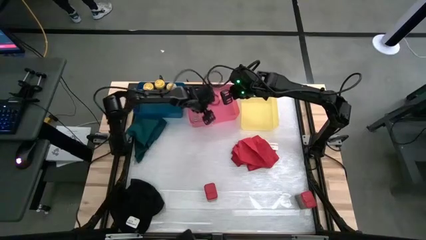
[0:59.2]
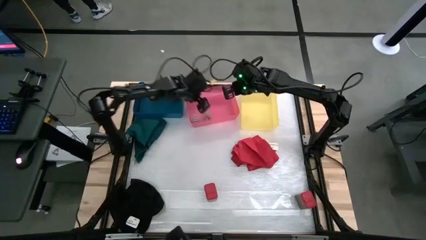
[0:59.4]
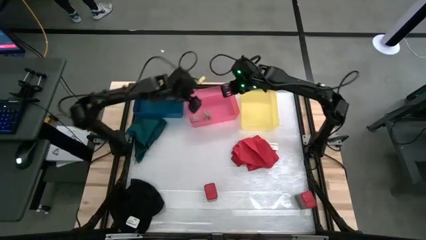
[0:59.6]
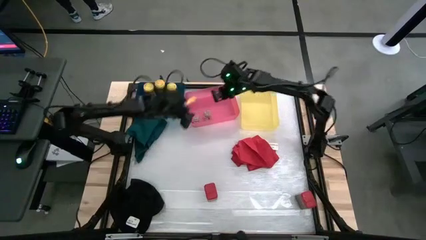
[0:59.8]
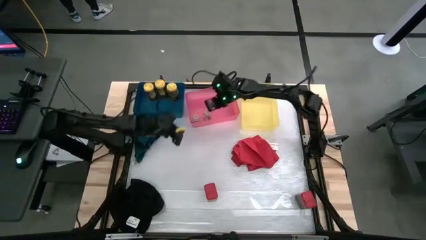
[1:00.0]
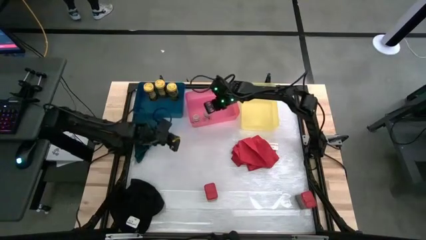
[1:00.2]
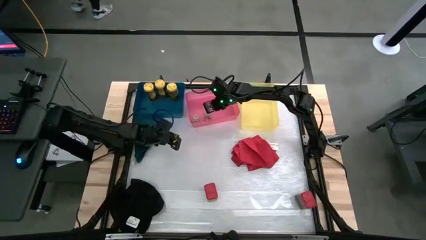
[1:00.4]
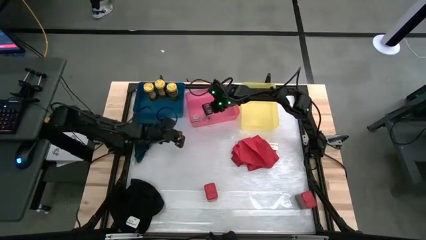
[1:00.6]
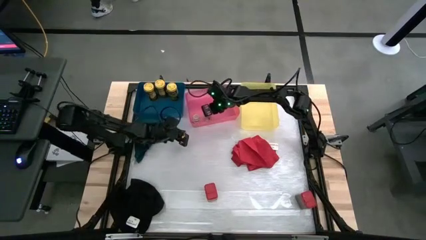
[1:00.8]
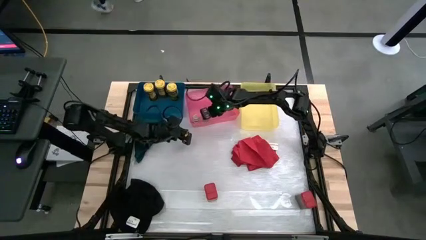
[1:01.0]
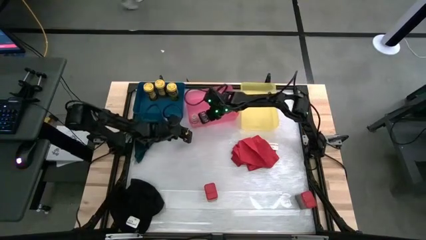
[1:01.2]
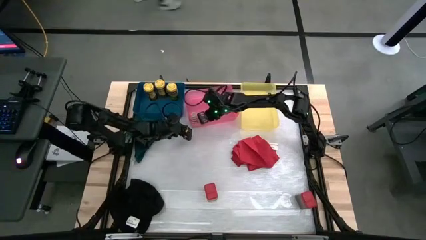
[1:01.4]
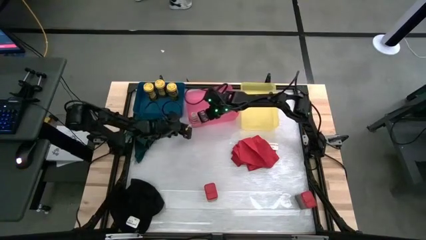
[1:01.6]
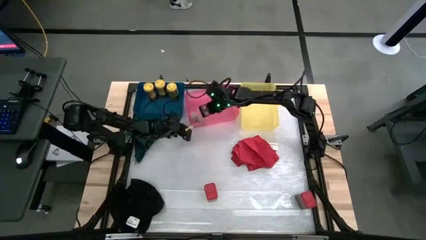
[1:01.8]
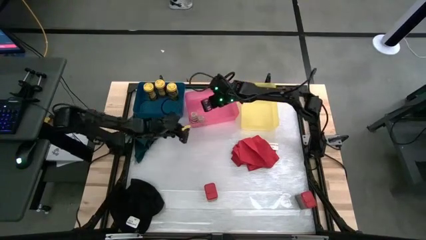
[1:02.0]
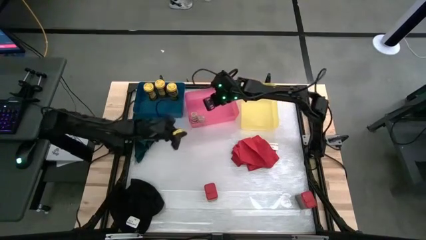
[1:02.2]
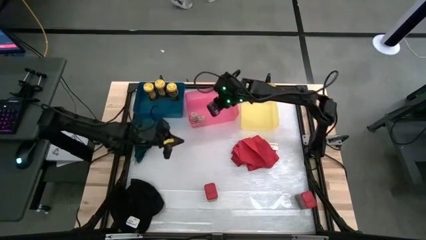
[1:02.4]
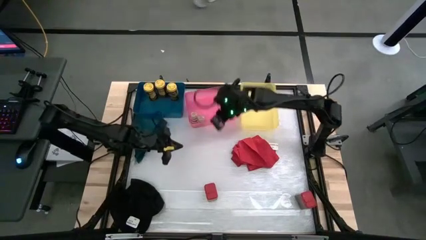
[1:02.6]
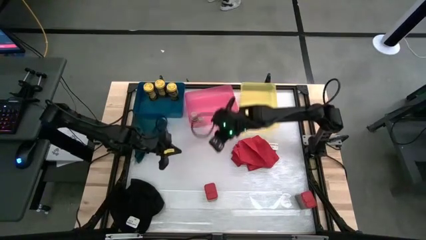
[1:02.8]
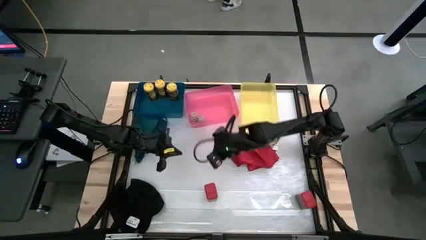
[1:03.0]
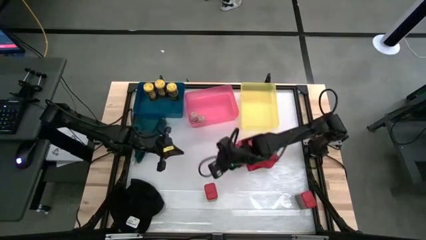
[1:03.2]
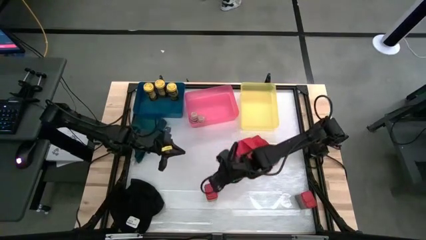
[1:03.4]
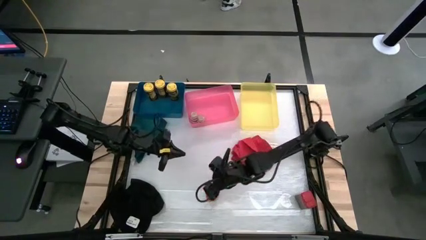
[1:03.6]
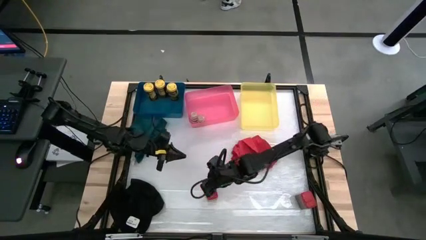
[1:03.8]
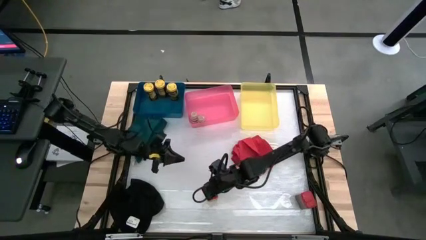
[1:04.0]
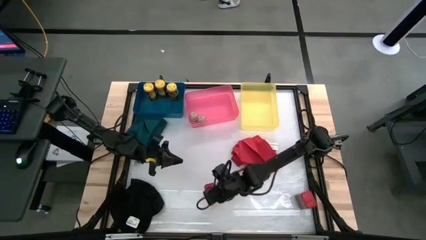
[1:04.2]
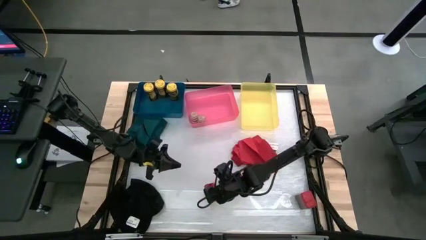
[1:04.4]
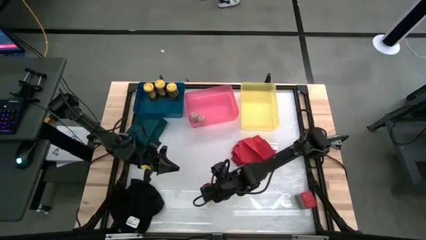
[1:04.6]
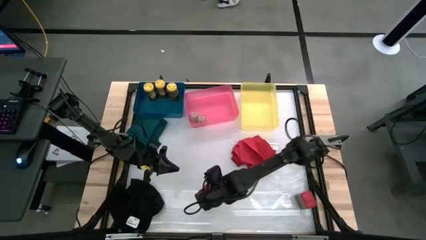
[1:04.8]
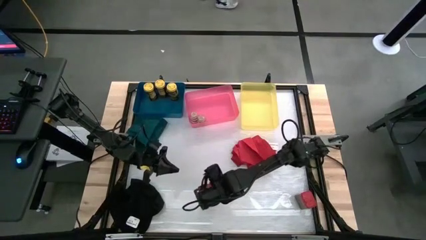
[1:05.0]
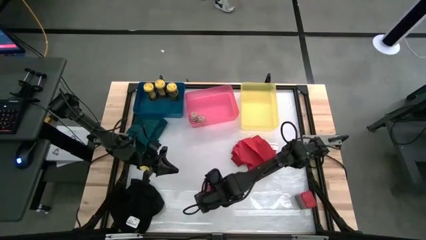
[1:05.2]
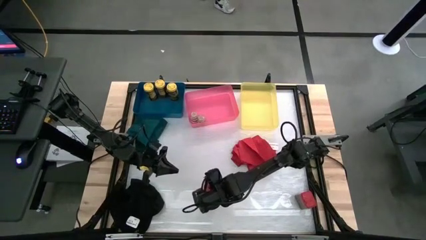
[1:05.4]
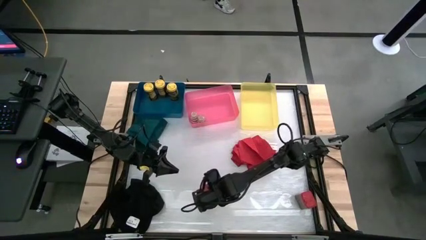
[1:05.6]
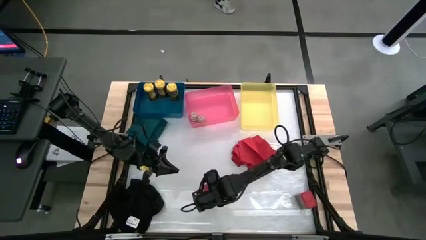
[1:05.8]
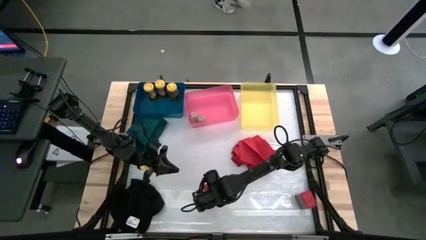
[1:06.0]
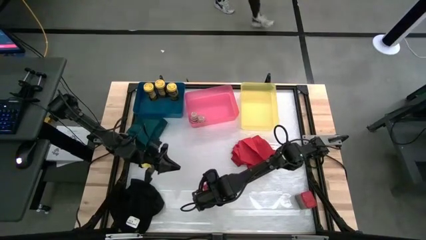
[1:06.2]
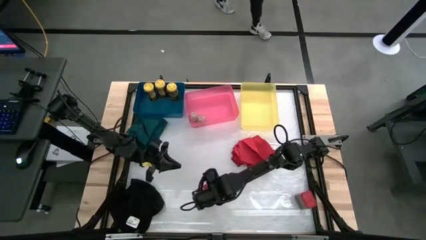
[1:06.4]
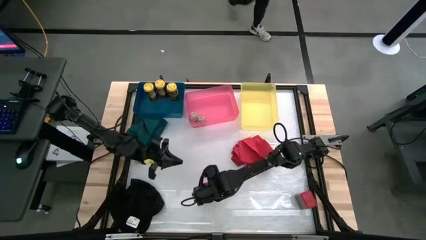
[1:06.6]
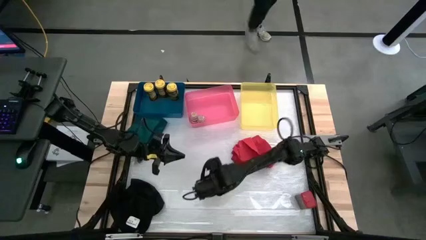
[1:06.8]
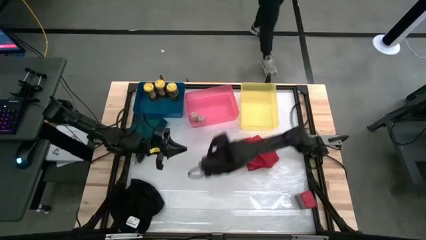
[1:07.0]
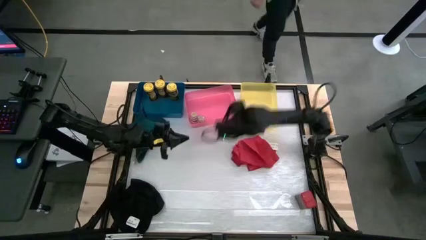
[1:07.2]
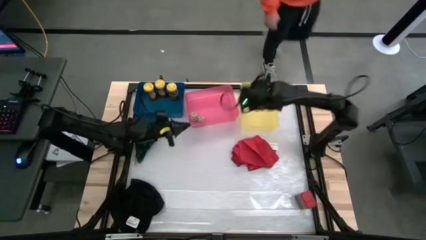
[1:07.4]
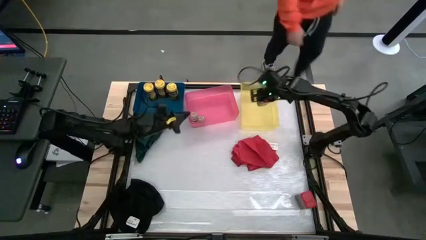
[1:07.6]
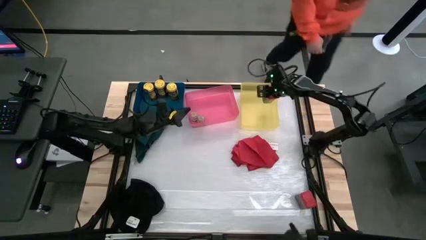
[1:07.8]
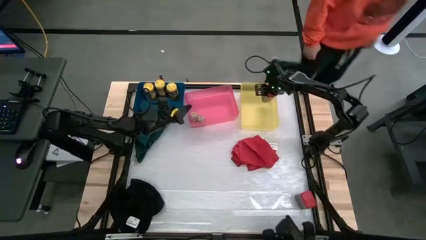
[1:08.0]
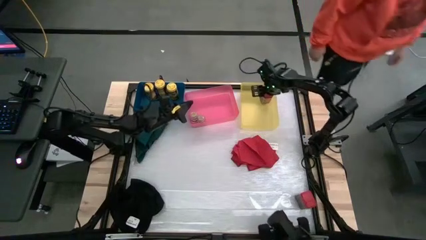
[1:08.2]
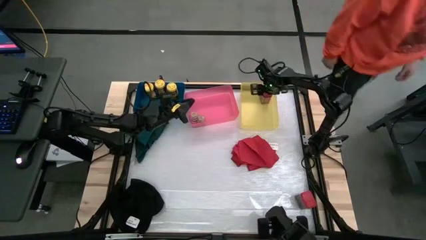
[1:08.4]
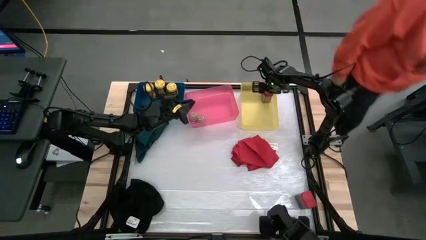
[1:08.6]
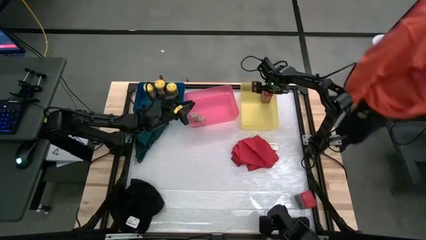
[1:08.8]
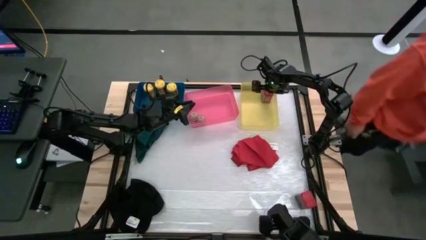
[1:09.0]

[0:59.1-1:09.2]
Task: Sort spices by type
Put the left red seasoning bottle into the yellow bin

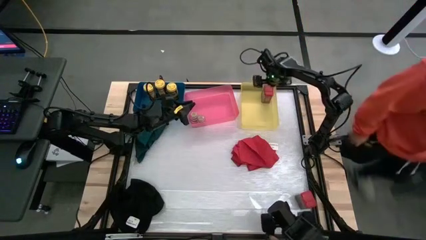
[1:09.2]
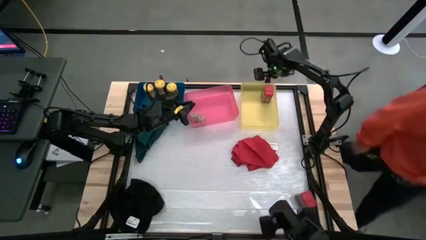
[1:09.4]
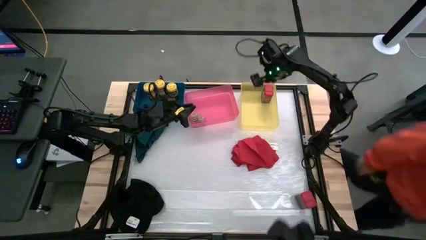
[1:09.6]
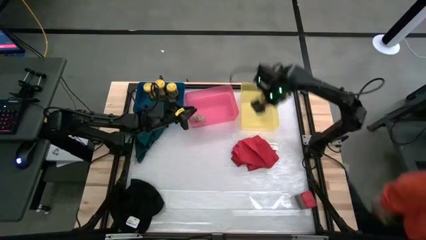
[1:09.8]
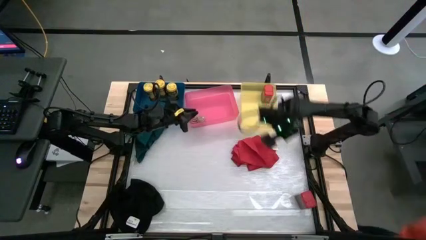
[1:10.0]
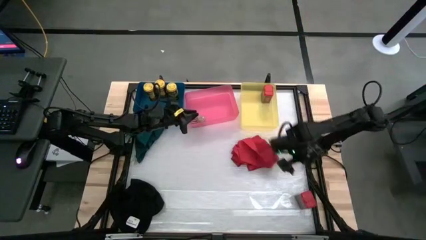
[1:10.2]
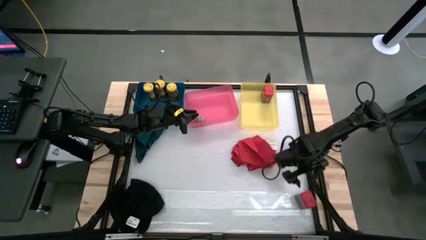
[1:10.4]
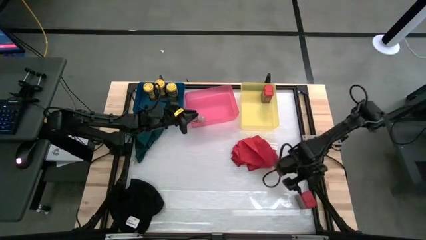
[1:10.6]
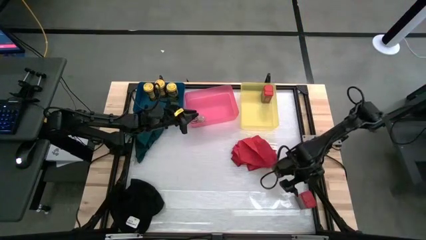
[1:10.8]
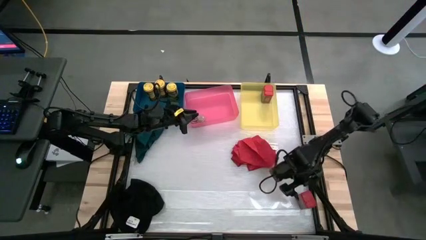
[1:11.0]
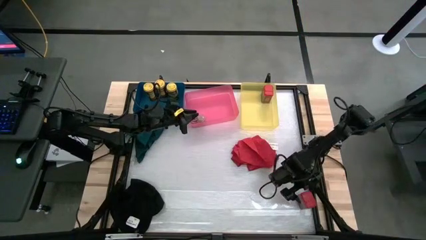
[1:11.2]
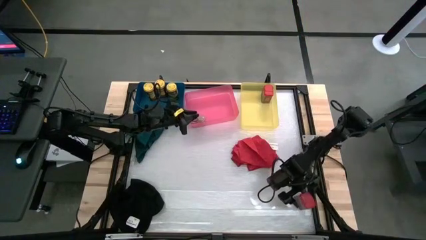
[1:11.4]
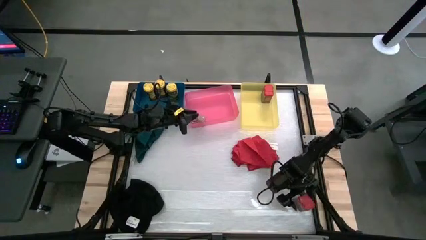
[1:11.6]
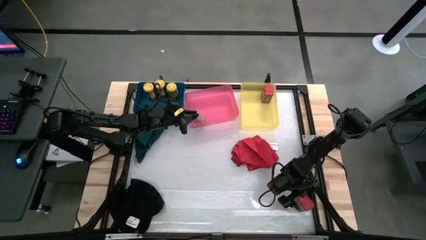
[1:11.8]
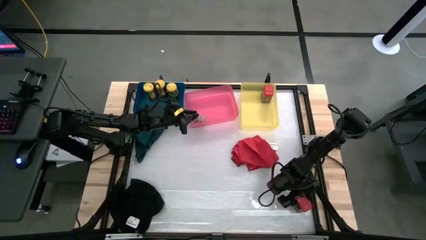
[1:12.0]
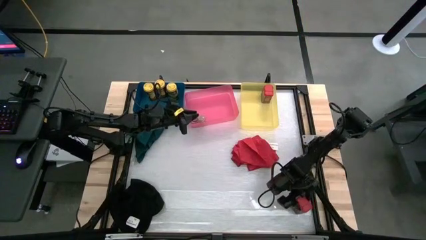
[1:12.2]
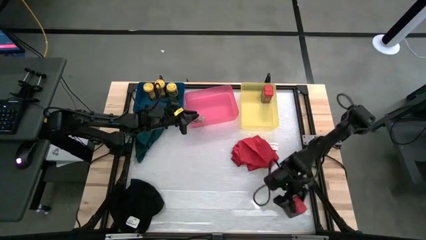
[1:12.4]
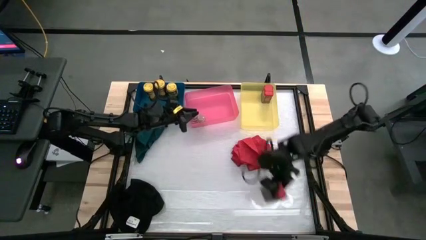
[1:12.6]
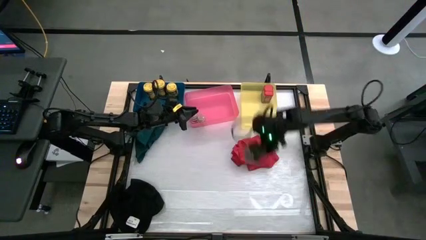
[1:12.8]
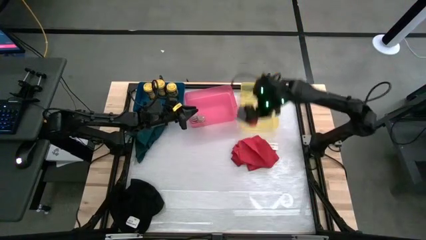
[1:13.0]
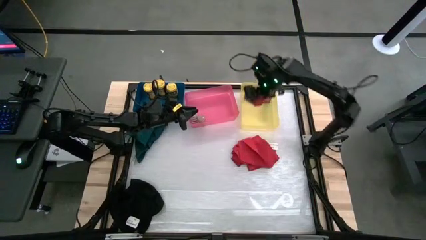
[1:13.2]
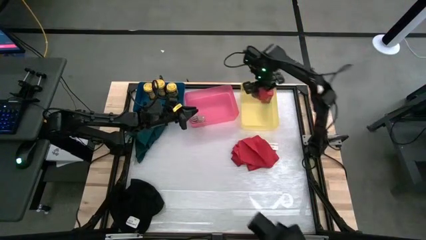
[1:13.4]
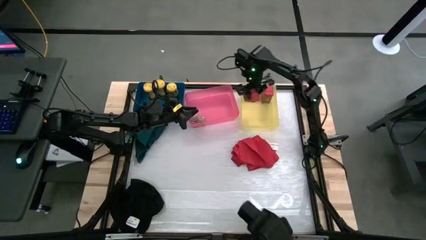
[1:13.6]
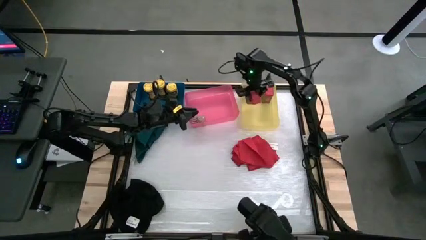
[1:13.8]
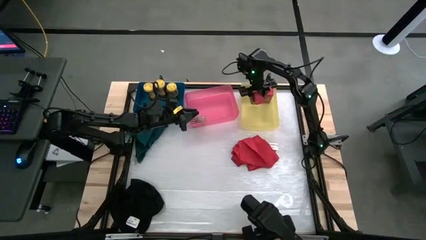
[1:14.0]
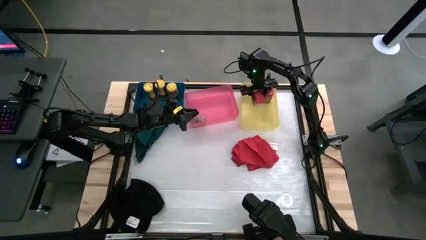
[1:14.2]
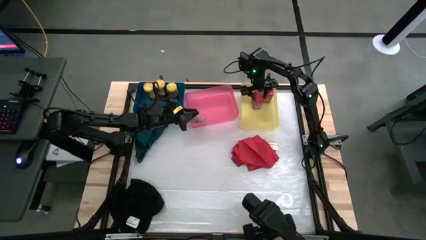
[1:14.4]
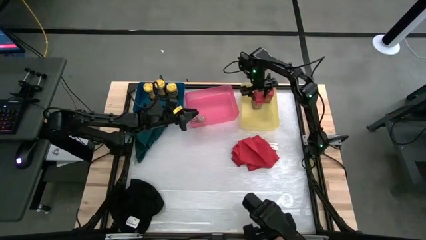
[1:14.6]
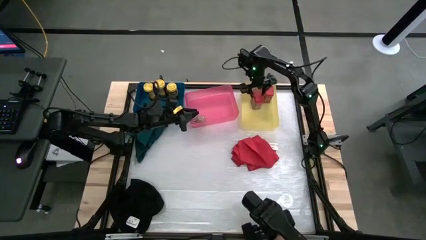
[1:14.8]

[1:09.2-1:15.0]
Put the red seasoning bottle into the yellow bin
